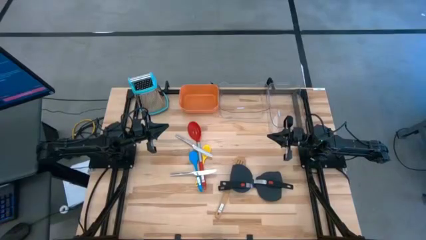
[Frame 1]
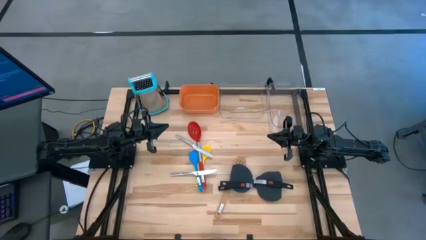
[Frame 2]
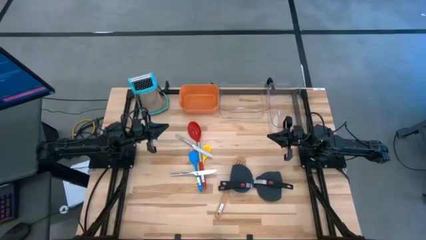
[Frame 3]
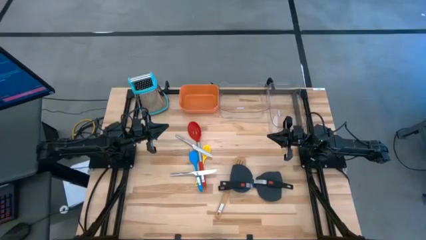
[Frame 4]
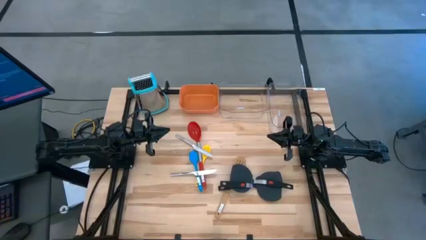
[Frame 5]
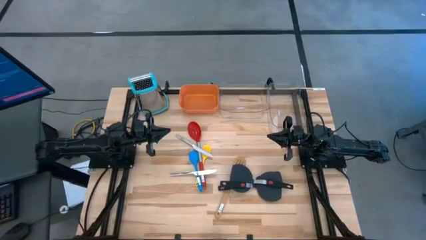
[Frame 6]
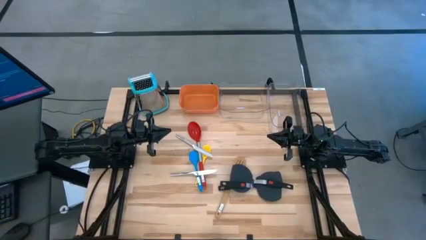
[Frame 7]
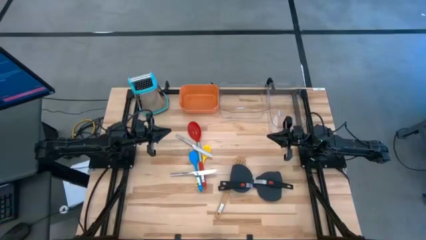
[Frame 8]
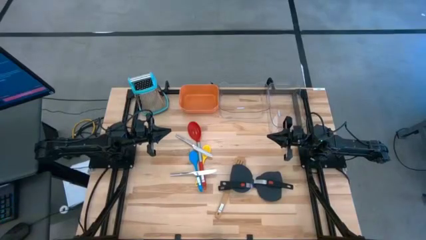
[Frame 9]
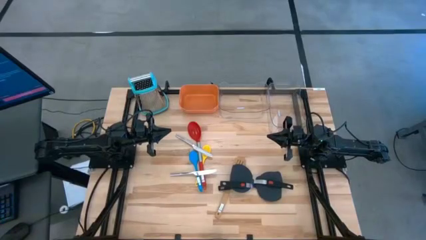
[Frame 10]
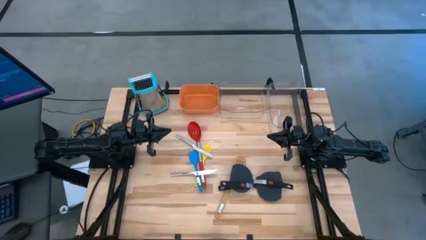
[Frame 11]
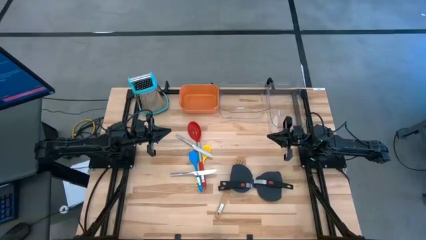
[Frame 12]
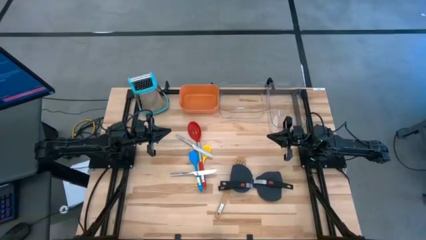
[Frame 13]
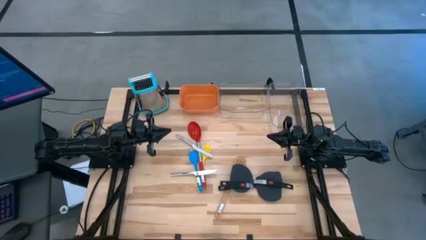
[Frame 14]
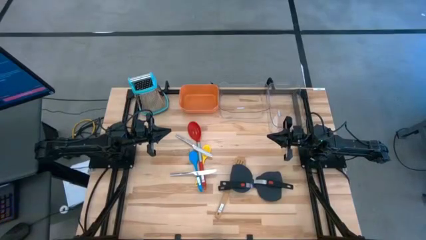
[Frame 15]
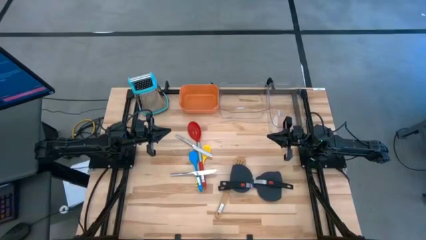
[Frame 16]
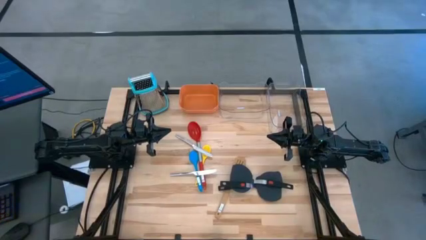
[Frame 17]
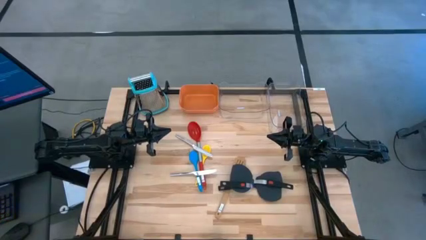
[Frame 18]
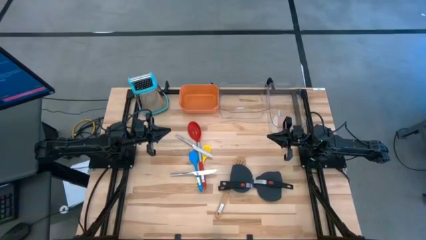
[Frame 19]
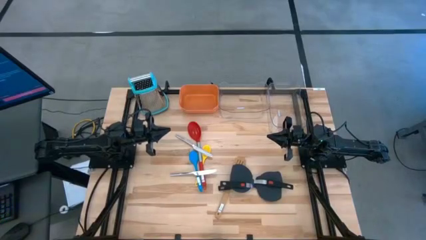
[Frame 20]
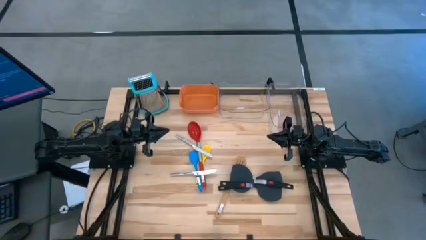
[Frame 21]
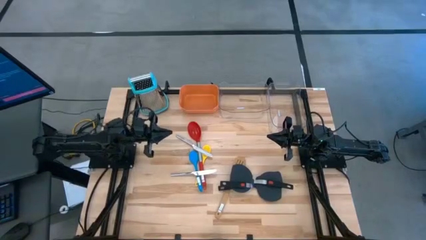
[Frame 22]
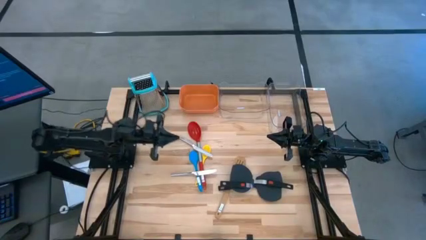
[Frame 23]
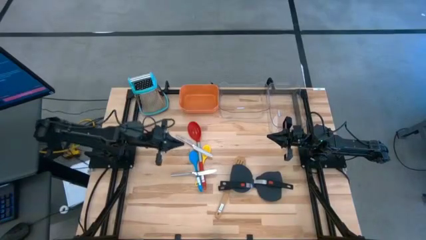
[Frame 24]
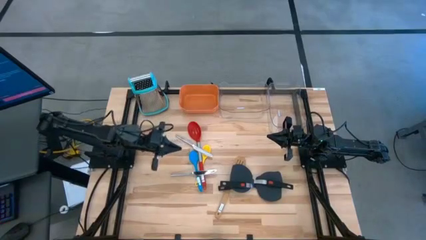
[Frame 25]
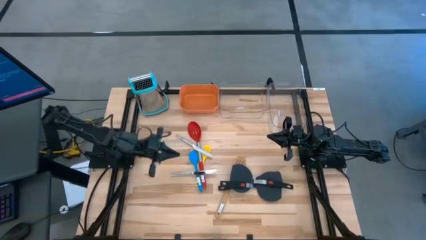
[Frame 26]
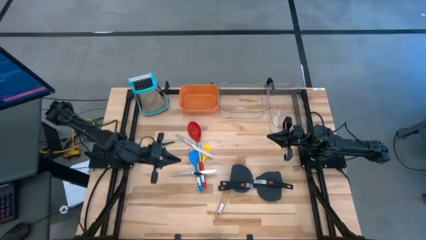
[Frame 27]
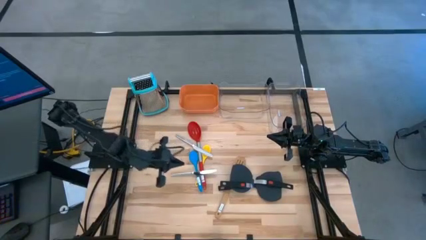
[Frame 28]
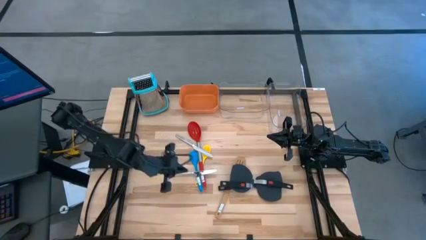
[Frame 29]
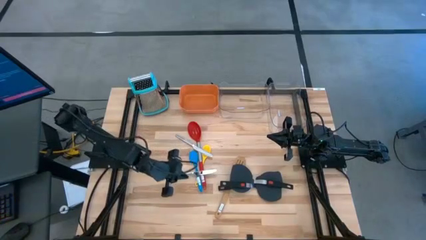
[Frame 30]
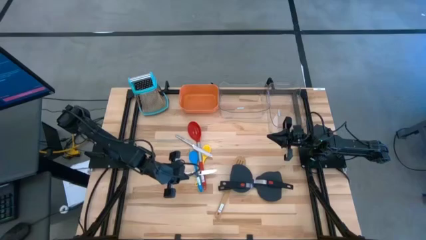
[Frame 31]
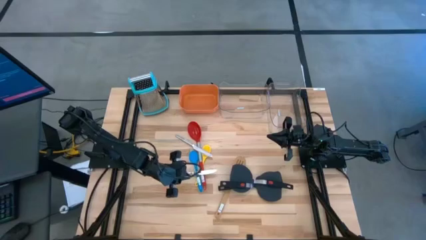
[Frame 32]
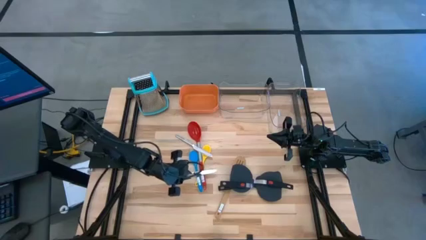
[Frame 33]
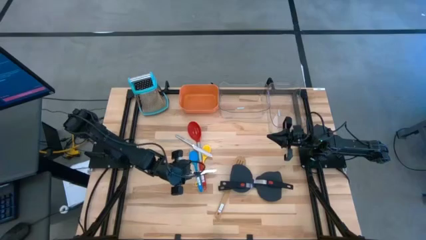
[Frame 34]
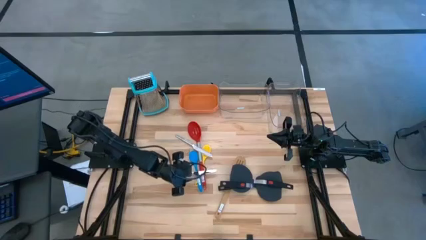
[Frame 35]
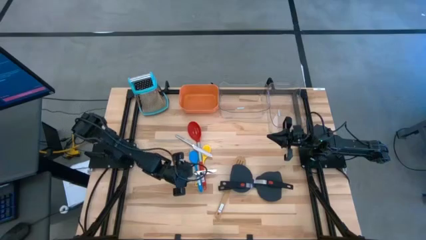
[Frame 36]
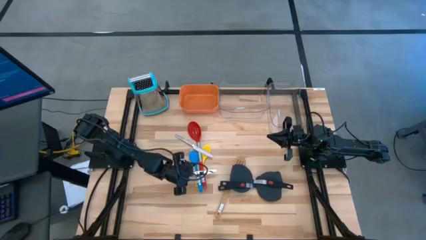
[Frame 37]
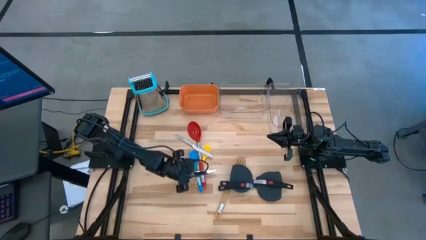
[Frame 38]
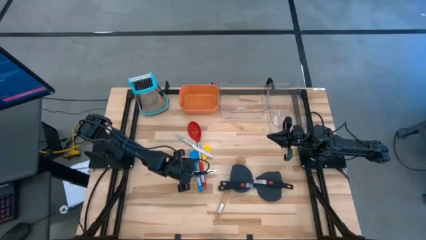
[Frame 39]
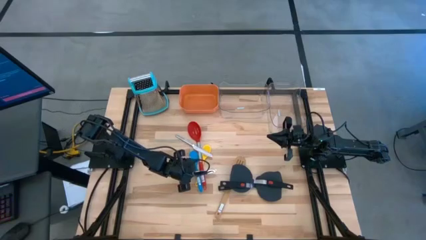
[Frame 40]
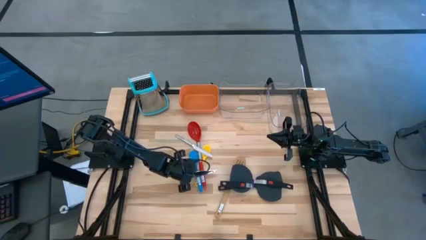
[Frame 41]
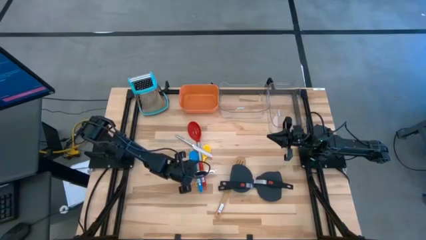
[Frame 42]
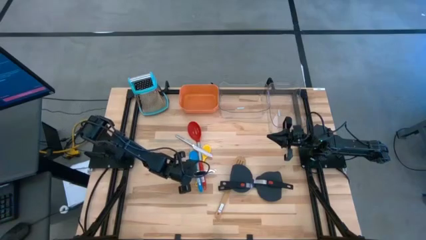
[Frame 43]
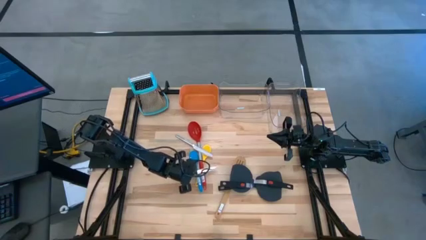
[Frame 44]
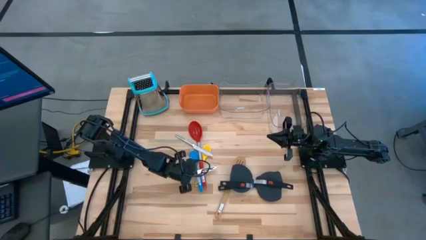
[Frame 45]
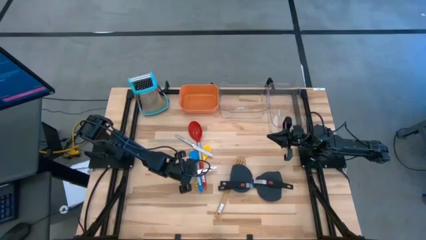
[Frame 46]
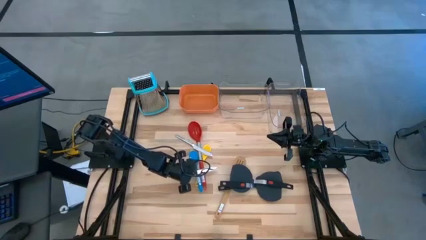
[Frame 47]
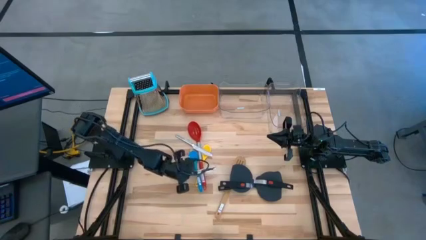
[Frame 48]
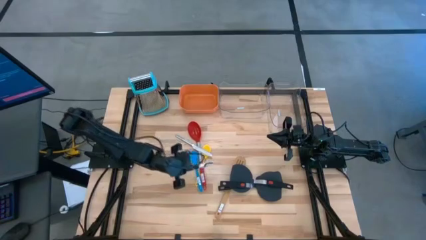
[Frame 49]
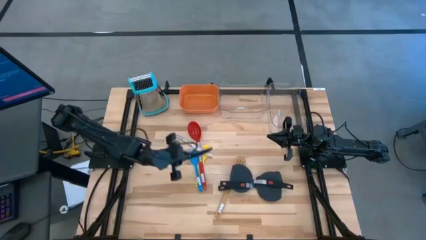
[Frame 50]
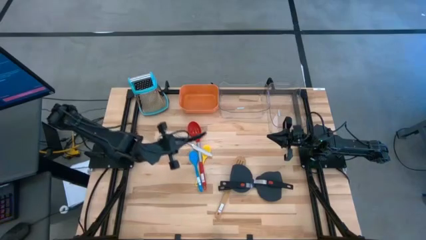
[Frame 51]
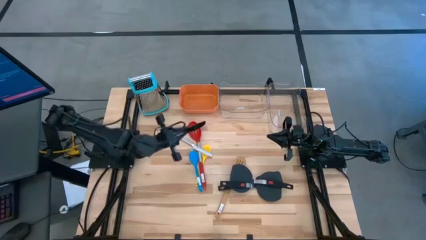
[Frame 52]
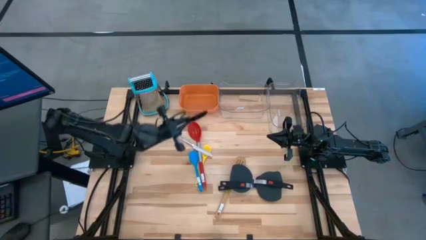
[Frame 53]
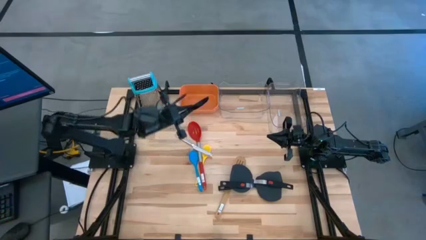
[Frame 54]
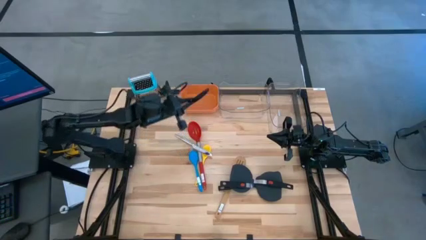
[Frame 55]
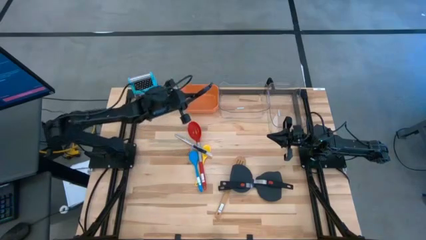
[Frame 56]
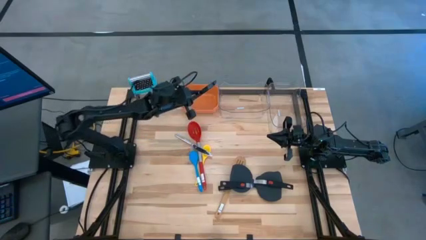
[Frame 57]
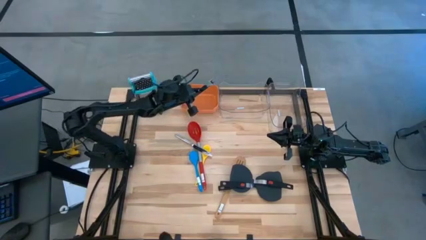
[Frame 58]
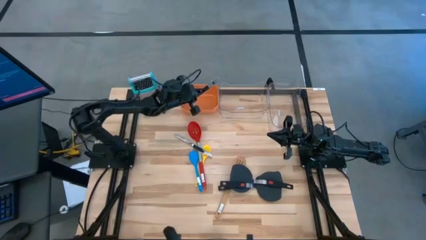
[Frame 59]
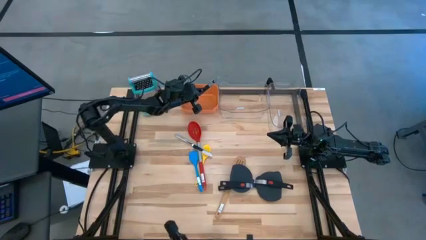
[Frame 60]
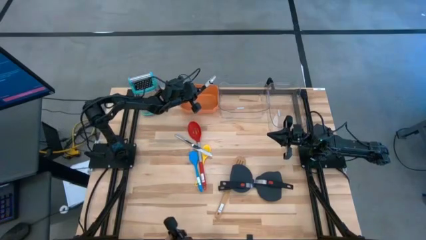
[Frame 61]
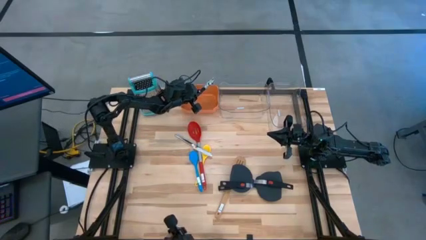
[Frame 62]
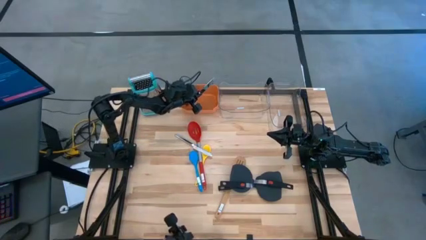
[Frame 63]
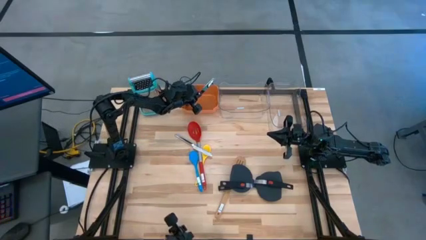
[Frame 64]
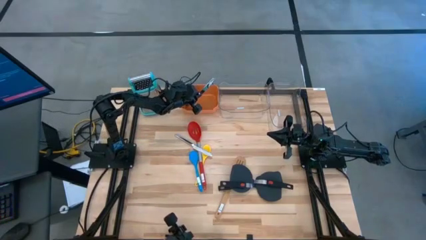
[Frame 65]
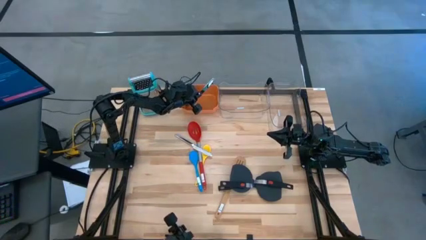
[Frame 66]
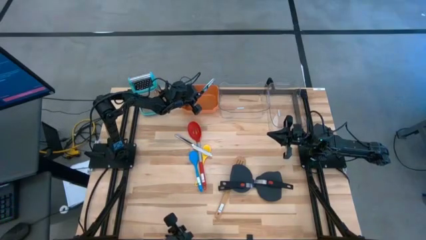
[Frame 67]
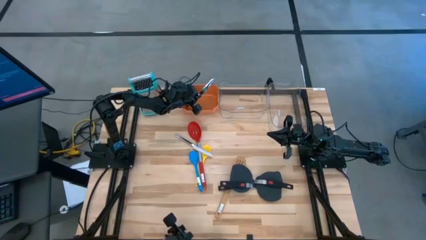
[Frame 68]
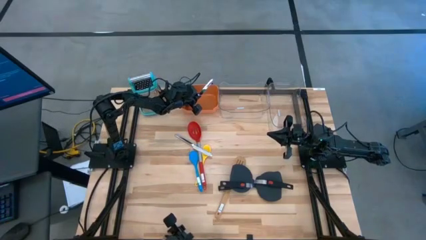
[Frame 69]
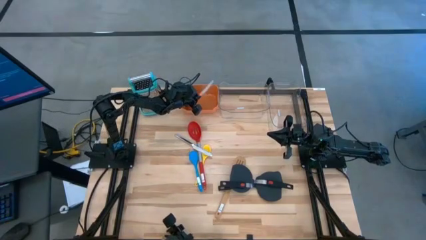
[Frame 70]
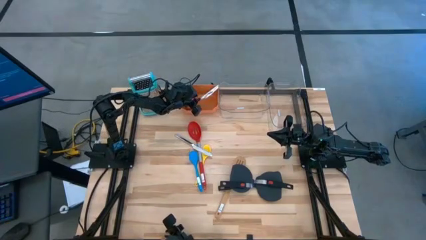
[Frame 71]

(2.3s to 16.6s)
Task: Pick & Place Kitchen Items
Put the silver knife into the orange bin
